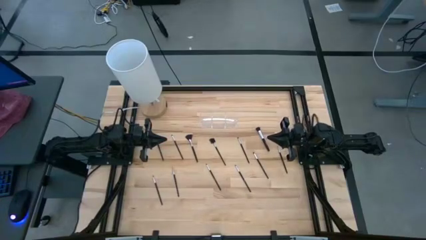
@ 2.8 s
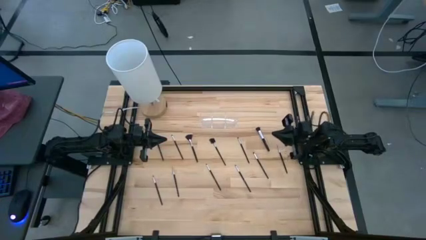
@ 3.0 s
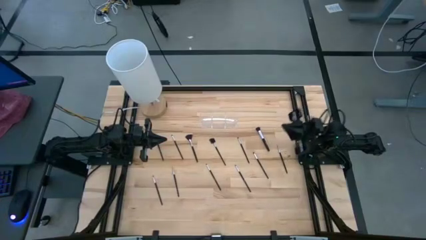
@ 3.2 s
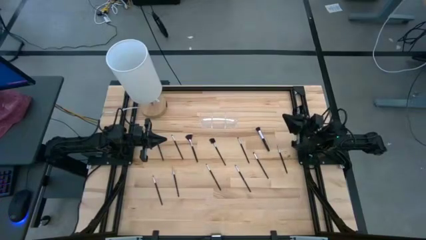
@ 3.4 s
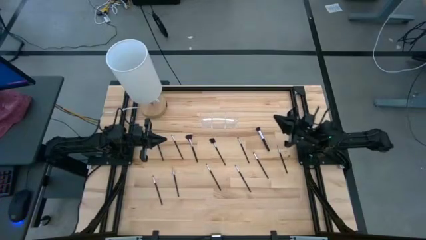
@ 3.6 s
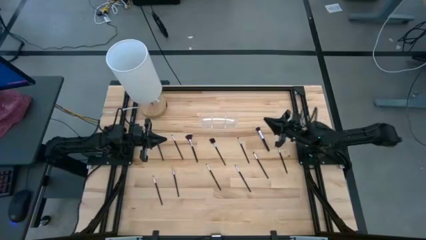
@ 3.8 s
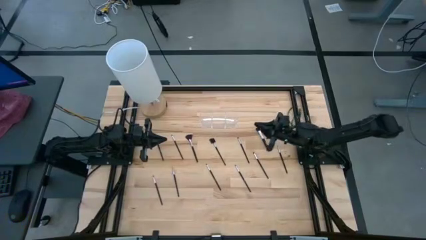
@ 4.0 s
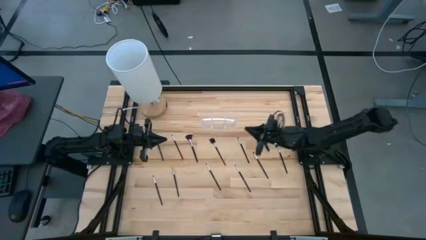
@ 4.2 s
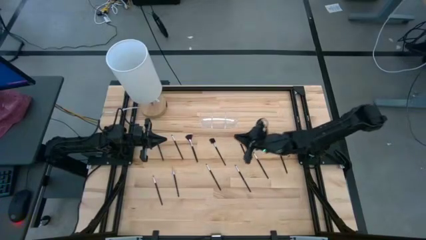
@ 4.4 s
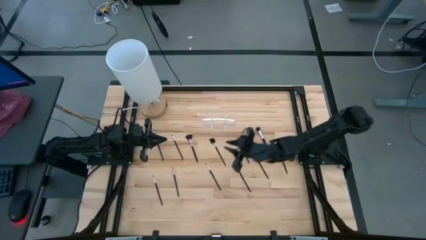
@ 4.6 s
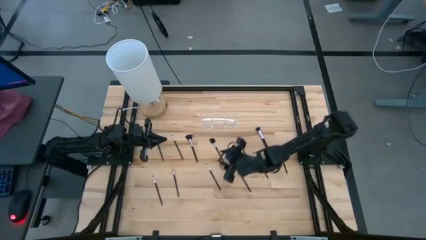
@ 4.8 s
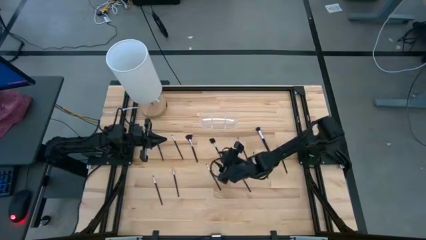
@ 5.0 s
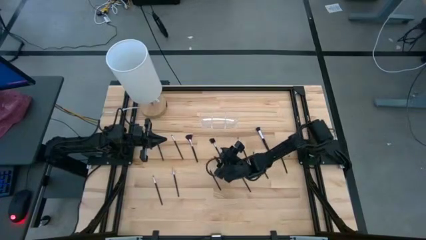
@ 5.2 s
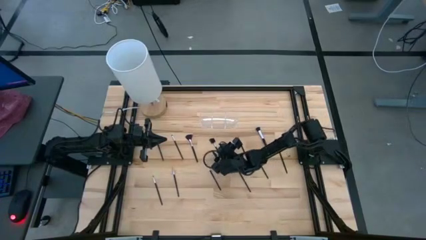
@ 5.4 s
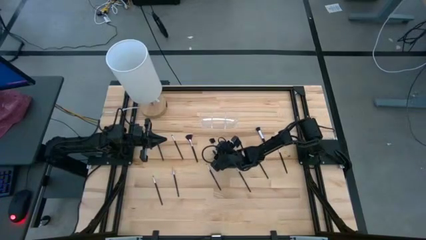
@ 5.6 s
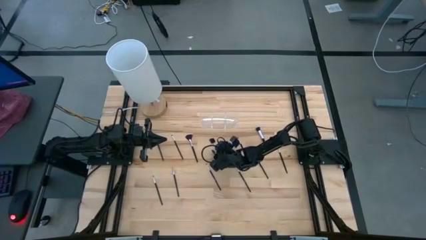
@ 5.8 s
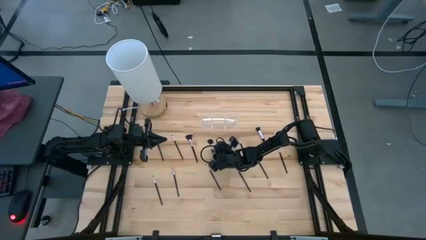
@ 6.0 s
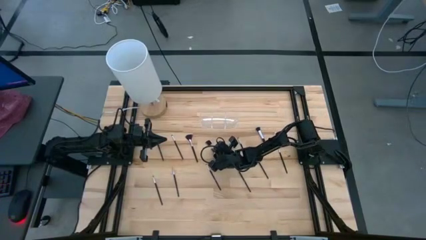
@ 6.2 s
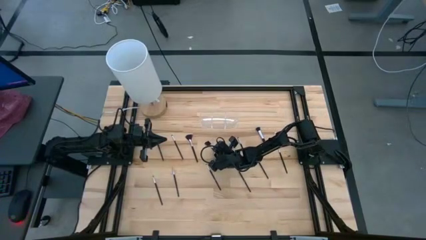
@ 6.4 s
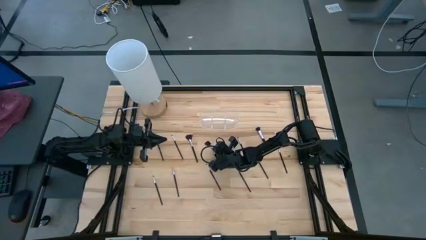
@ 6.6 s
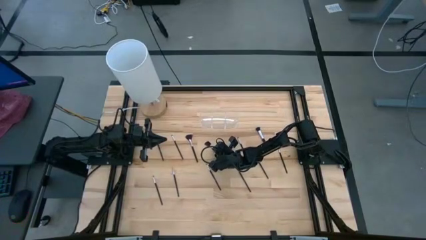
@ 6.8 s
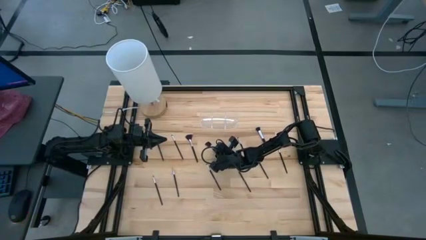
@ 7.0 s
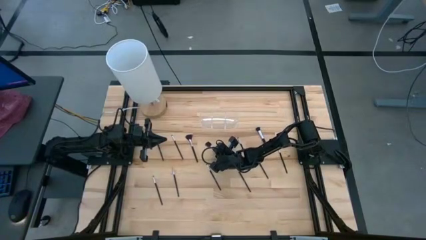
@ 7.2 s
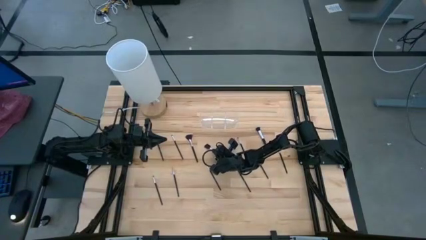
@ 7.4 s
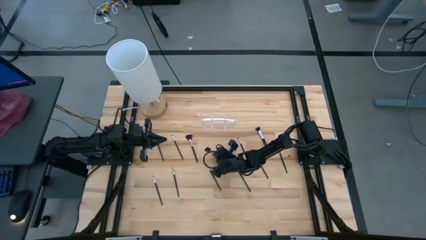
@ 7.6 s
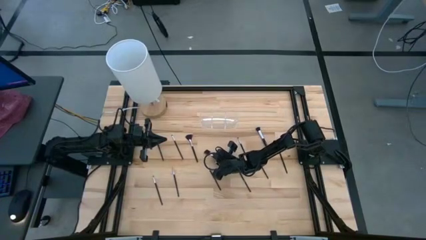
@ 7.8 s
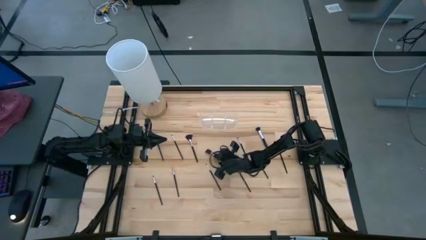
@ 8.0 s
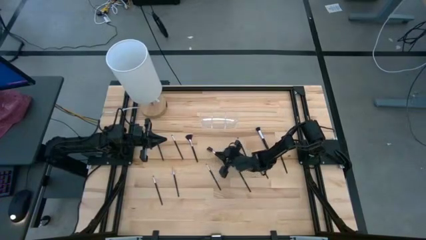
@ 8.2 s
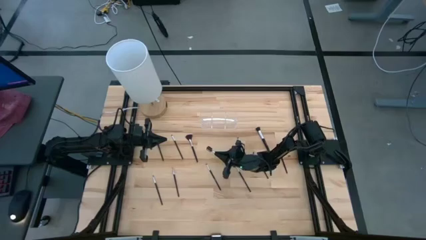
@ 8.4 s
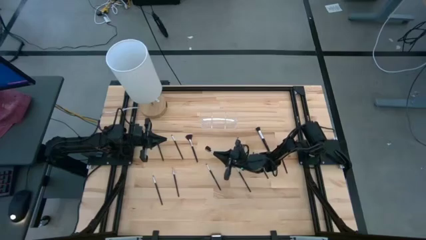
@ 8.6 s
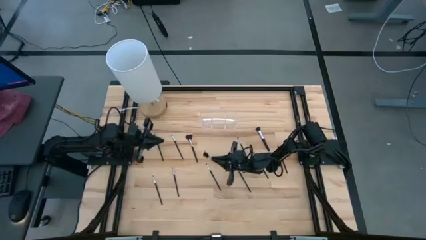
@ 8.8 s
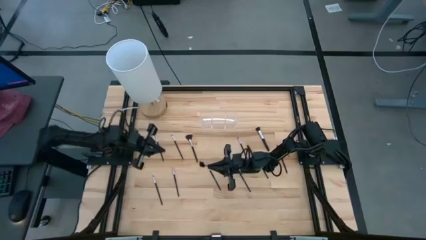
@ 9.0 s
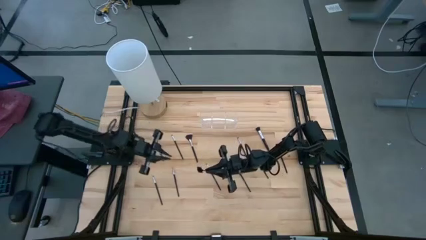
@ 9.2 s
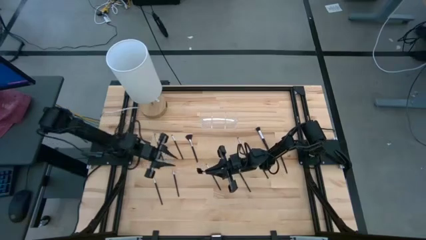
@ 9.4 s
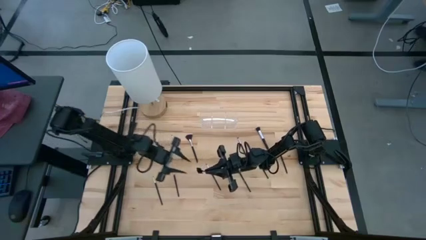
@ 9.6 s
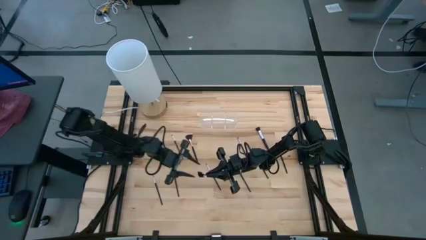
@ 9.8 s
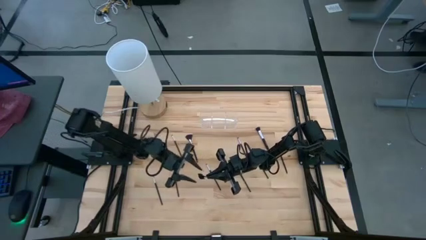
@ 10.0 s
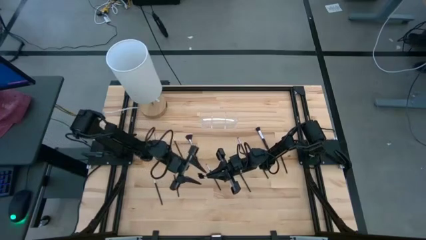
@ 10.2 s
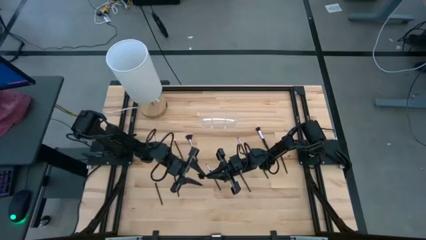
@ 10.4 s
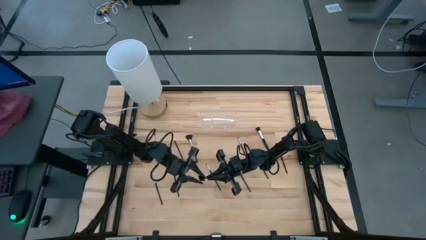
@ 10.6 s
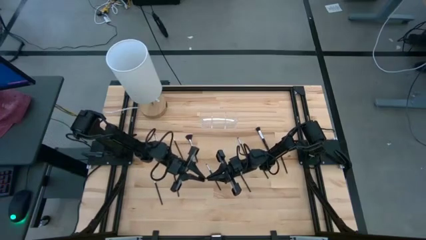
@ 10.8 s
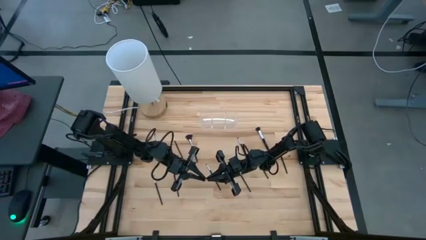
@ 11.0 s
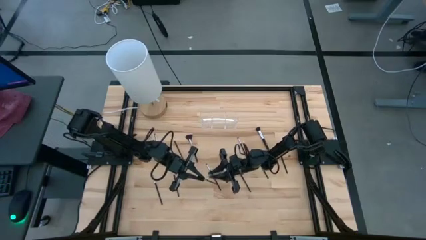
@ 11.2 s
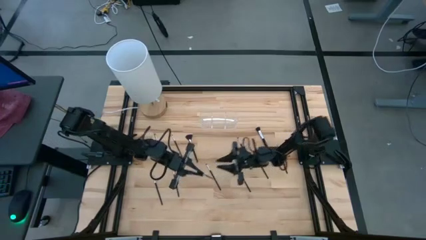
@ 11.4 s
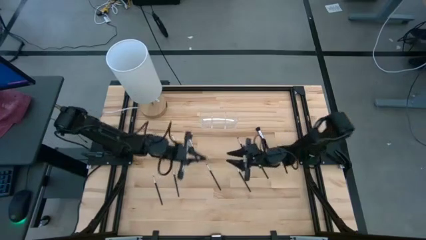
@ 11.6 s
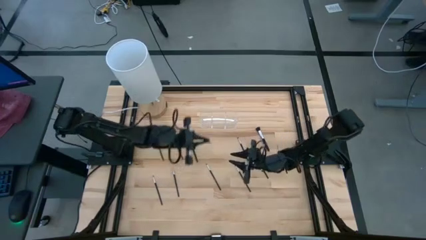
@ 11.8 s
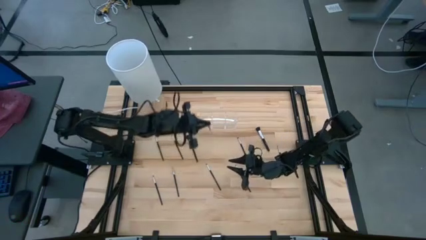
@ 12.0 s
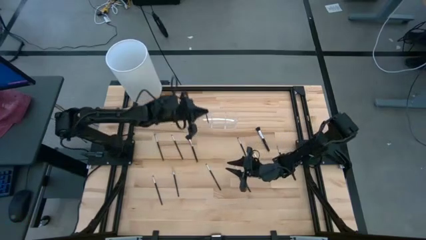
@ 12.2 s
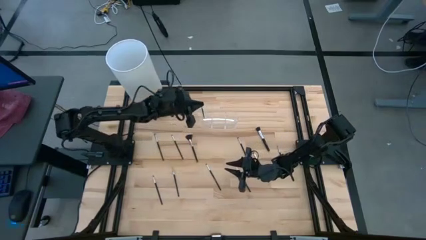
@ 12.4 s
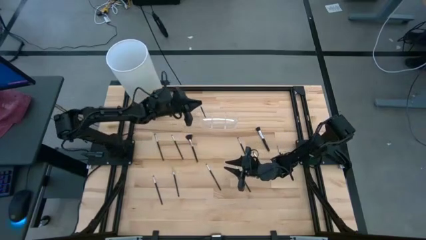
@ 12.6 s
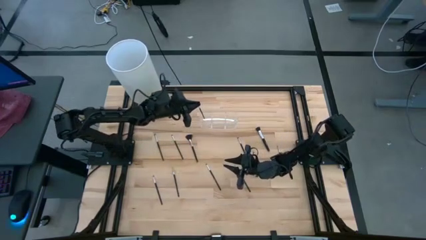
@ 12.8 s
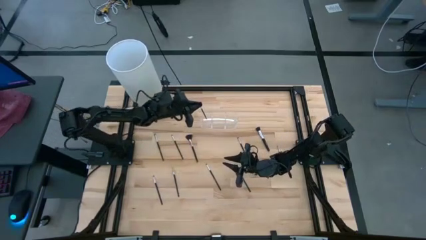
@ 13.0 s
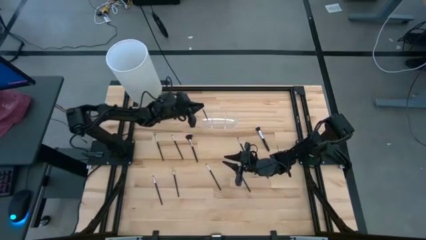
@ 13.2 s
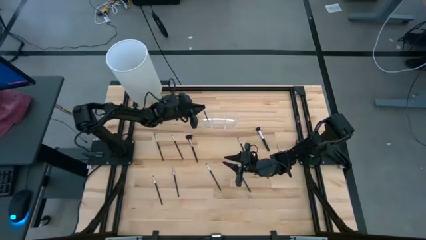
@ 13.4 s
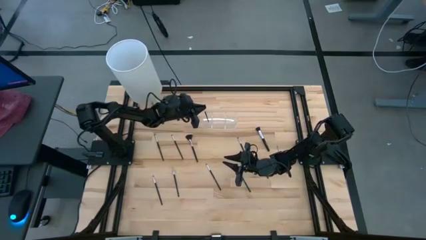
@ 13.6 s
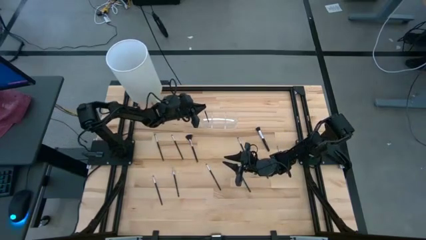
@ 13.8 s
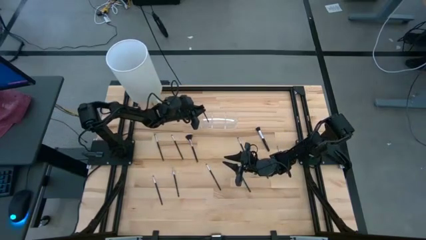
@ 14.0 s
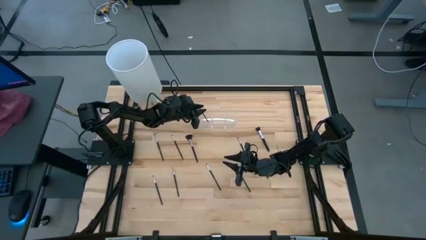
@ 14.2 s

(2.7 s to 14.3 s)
Task: Put items in baskets/containers
Put the black brow brush into the transparent organizer
